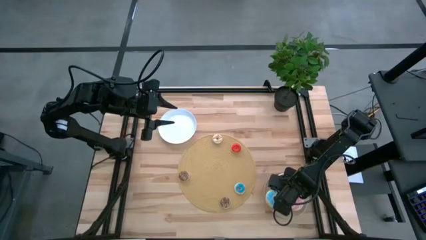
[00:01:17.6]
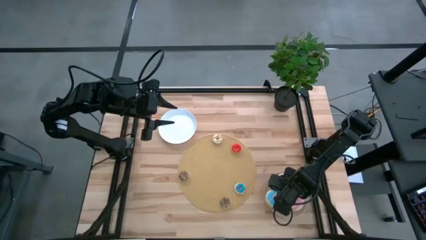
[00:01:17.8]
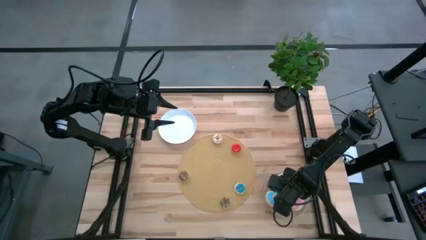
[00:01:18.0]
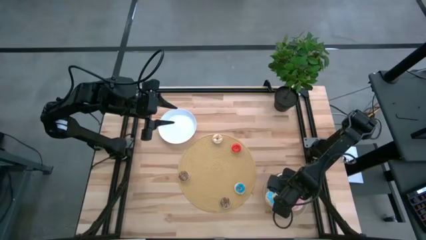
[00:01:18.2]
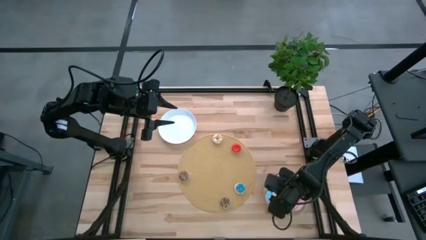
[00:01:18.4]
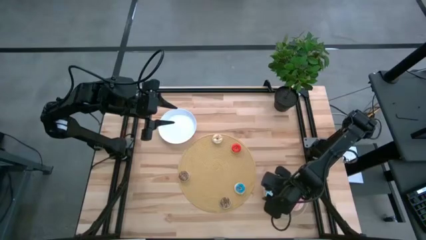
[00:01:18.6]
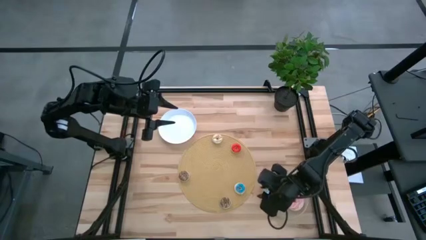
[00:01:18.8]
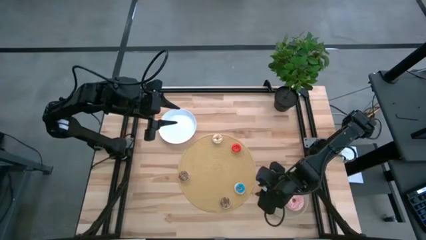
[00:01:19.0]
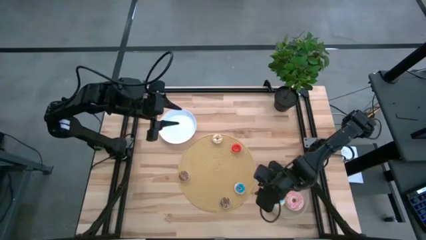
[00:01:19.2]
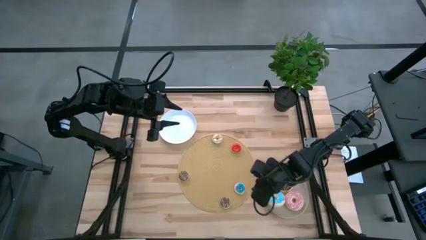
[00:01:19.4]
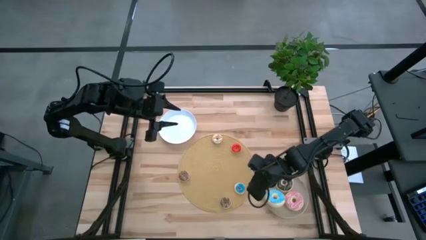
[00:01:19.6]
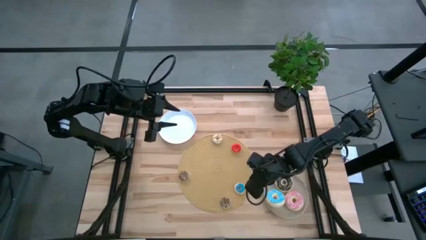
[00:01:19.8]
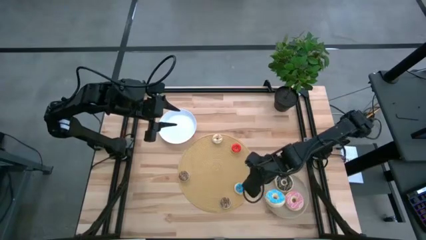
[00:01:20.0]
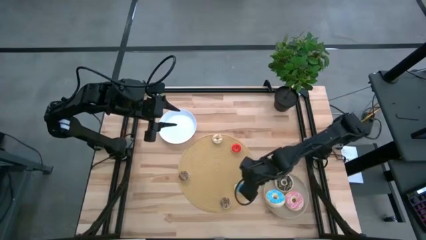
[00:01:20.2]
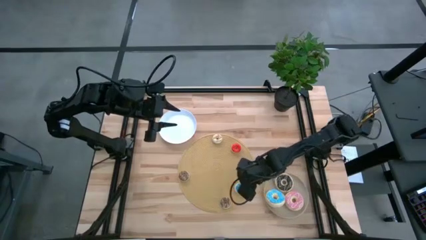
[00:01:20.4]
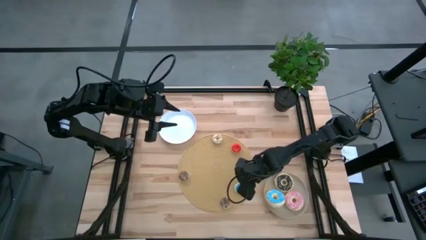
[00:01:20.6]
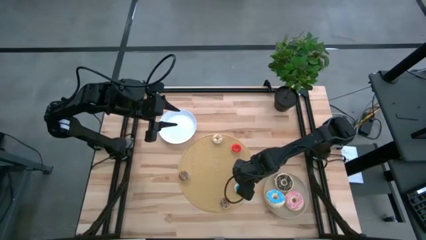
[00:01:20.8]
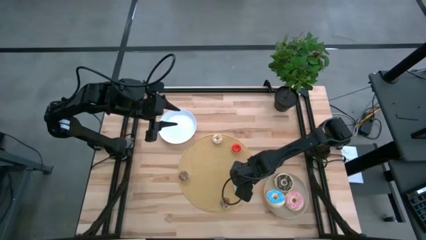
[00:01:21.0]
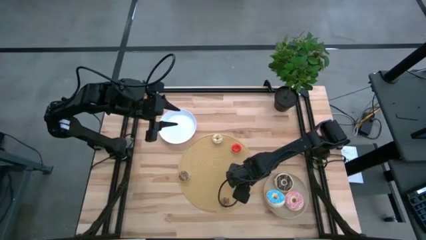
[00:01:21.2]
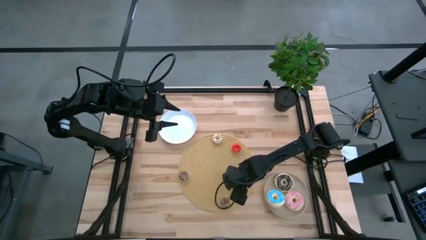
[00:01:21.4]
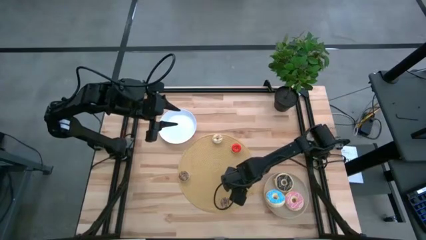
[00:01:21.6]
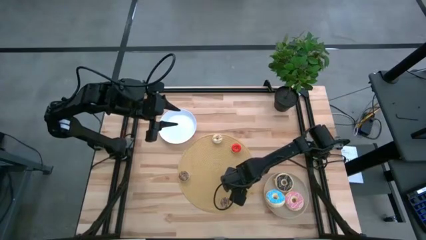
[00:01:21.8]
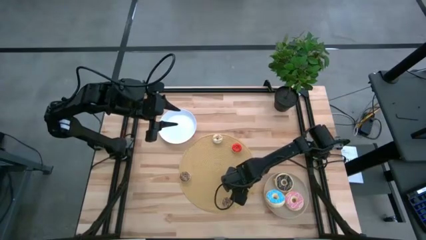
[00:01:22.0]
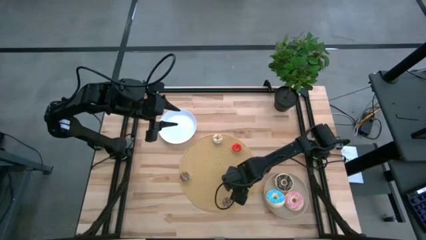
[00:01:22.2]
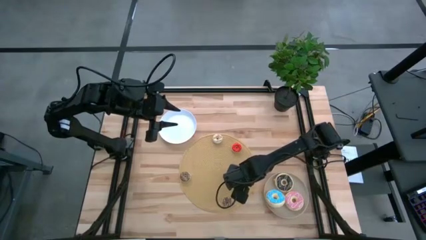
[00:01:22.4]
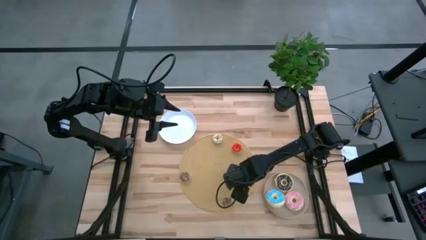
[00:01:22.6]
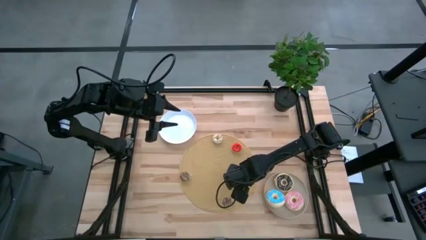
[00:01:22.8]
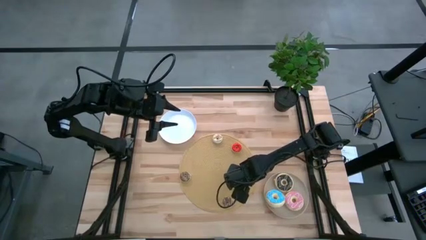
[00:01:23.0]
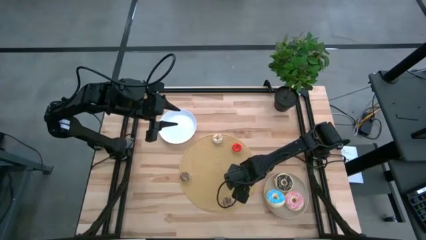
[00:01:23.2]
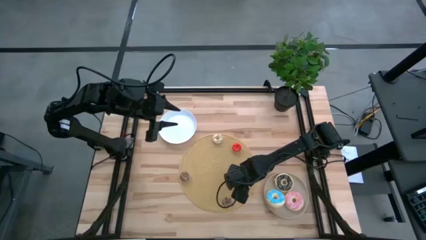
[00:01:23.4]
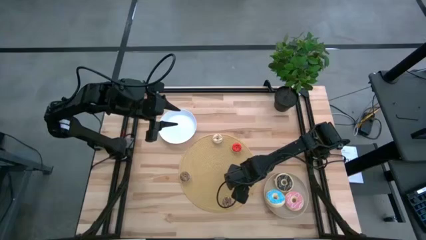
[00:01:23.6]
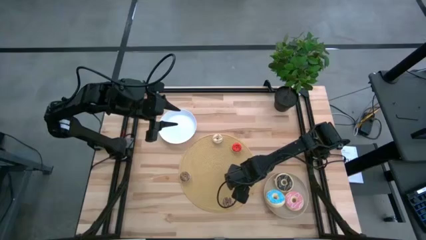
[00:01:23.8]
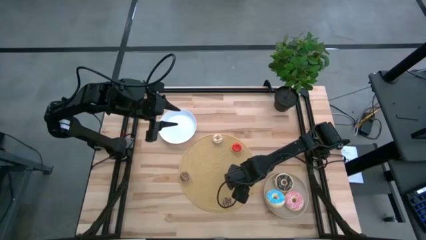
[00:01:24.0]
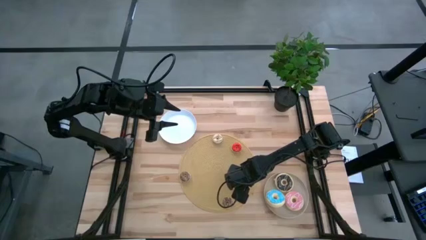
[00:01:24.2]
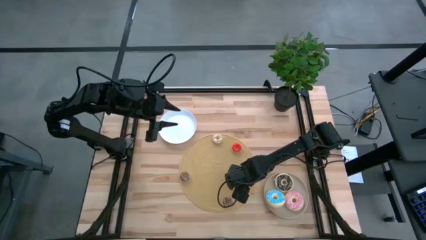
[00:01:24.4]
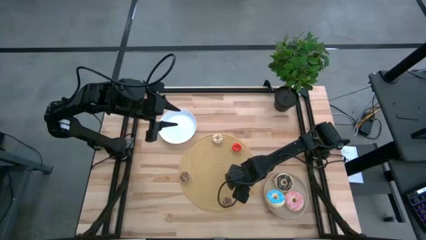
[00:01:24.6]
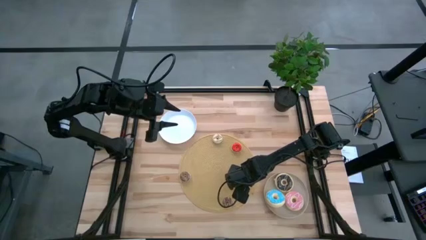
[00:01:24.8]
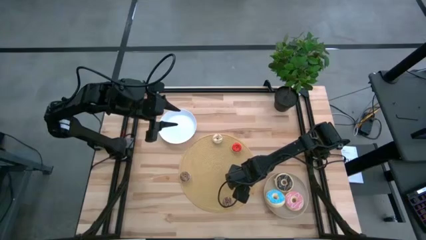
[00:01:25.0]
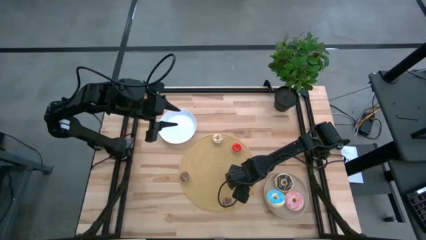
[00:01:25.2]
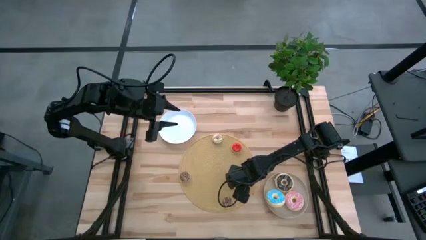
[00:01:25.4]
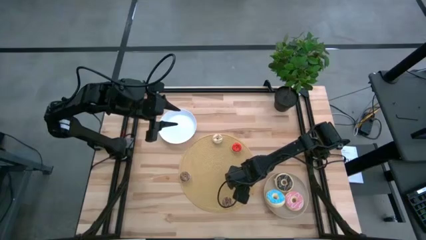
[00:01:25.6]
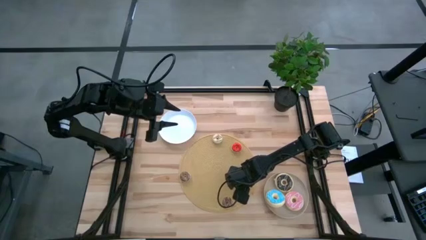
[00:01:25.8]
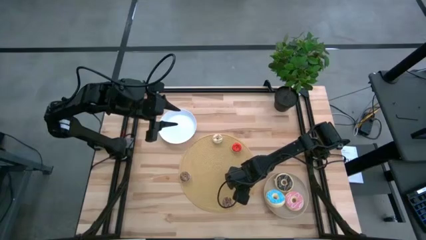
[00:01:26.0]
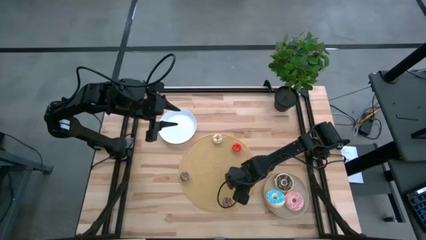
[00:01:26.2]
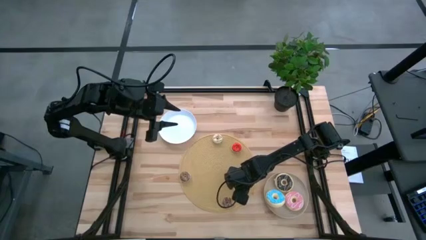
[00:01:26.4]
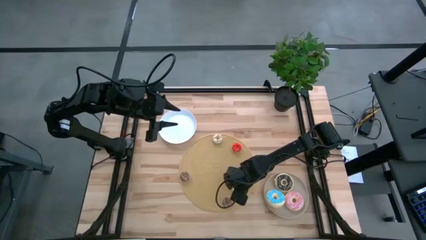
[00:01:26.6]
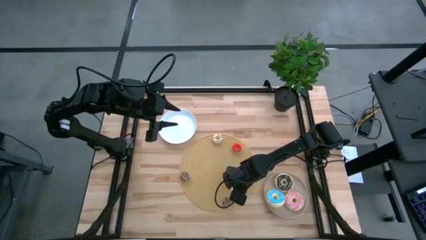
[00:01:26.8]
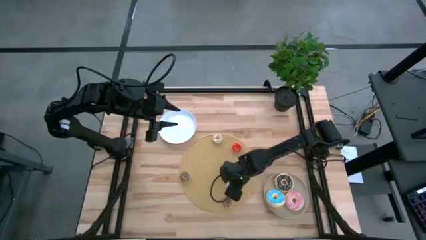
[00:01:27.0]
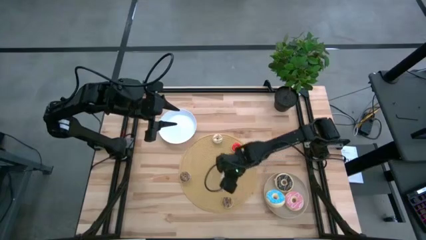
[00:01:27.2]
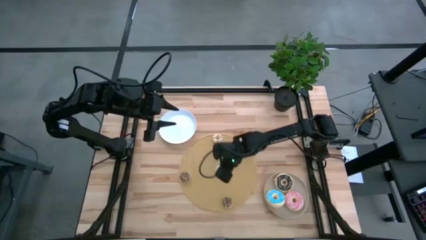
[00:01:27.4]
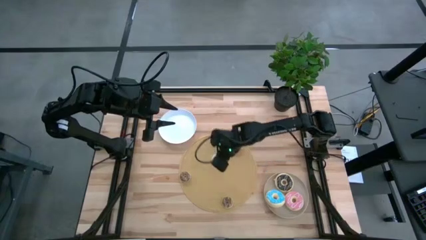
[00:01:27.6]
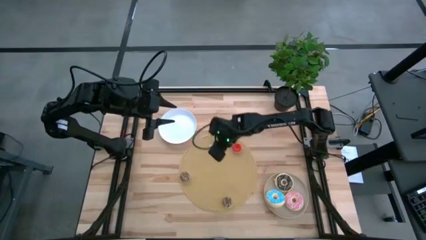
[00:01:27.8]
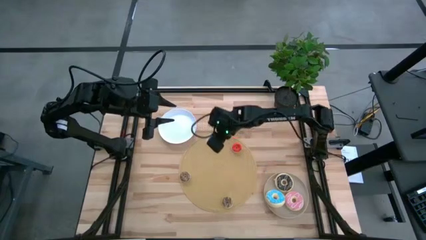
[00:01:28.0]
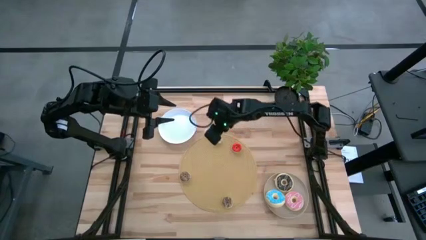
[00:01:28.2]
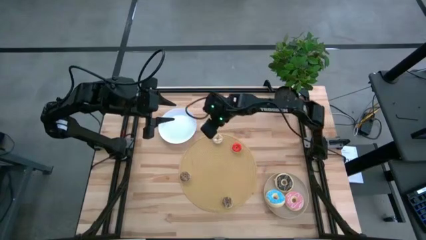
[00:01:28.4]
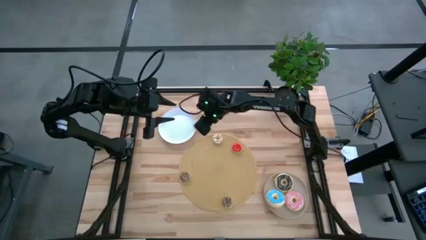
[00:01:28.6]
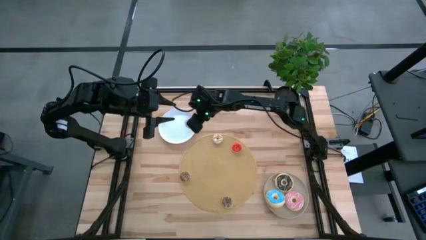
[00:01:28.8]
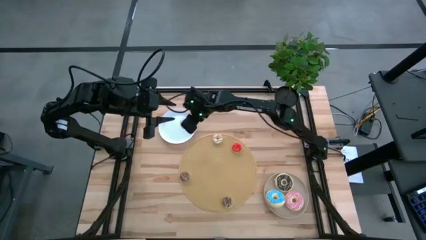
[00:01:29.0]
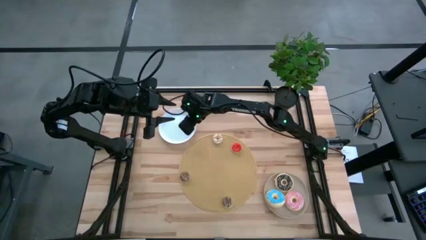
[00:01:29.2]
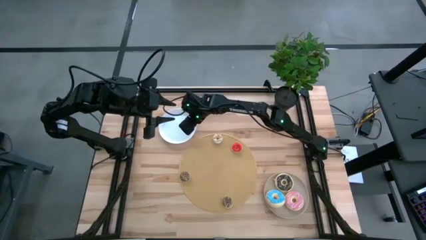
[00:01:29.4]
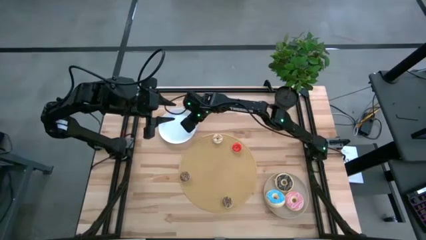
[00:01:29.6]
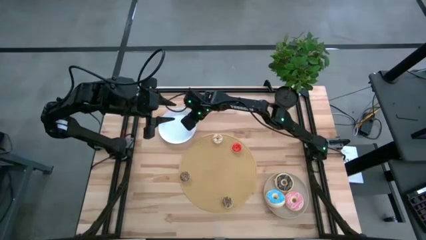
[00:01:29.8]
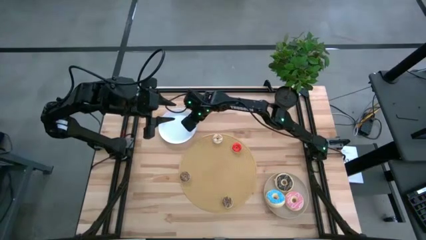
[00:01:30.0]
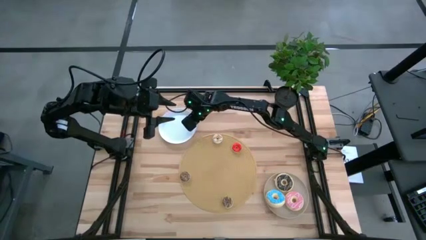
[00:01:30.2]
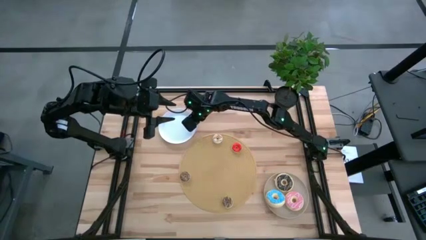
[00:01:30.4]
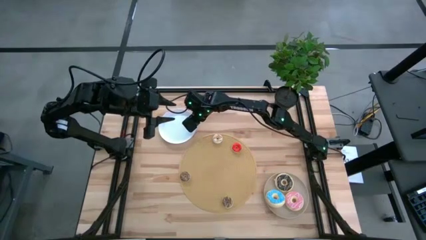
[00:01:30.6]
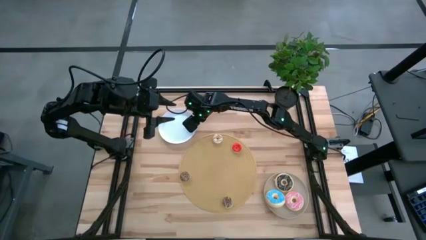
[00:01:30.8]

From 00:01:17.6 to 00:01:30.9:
Task: Pick & Place donuts
Put the small blue donut into the white plate
